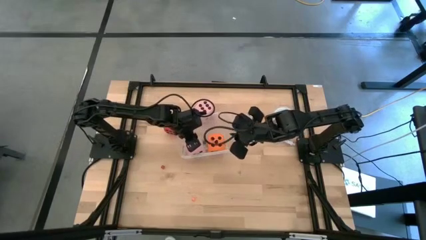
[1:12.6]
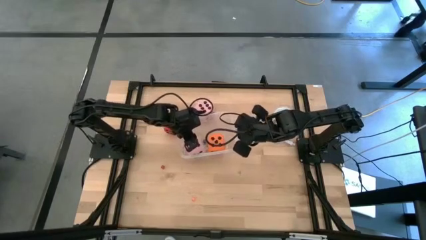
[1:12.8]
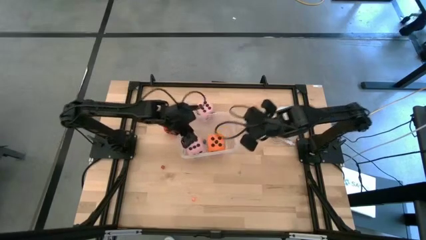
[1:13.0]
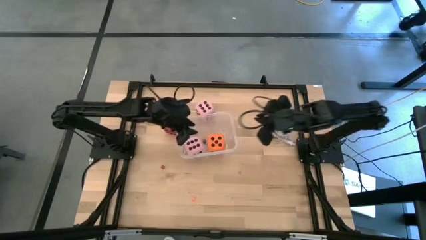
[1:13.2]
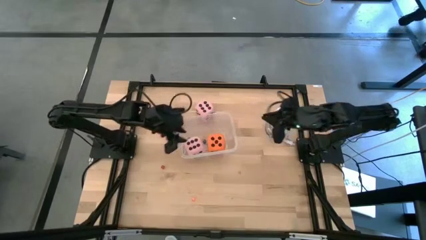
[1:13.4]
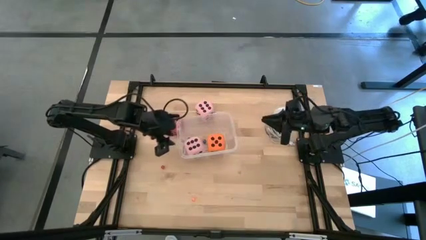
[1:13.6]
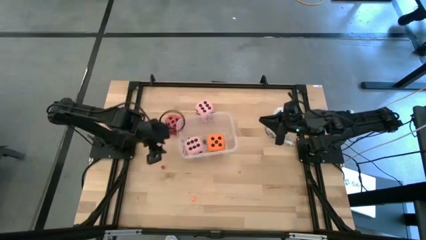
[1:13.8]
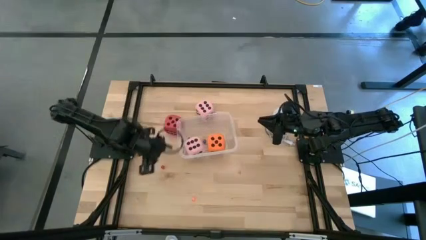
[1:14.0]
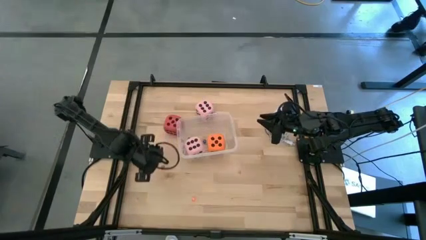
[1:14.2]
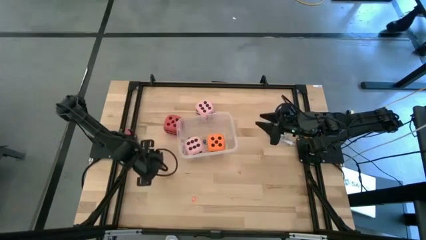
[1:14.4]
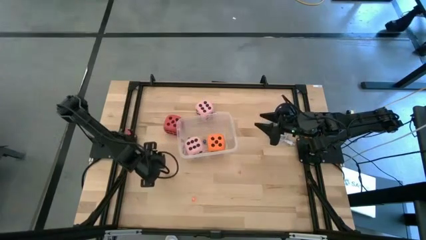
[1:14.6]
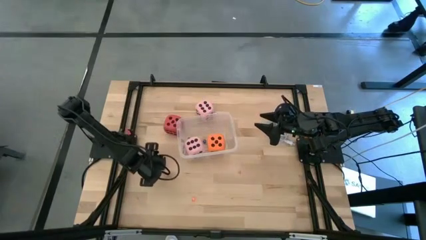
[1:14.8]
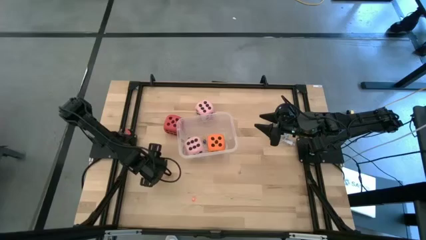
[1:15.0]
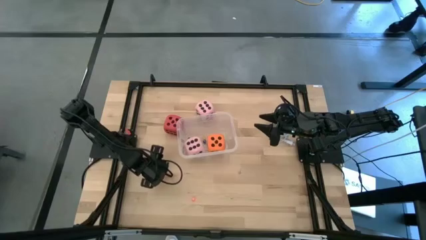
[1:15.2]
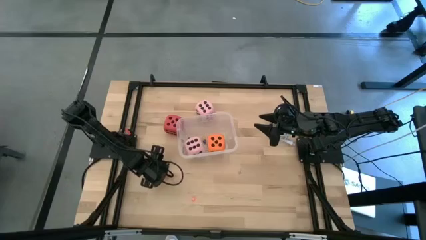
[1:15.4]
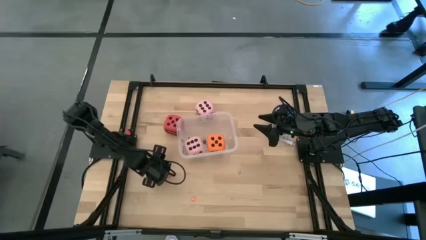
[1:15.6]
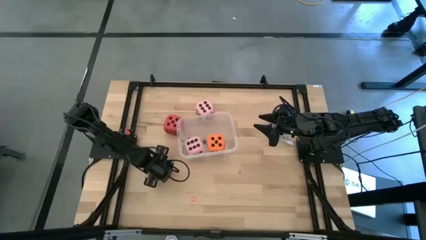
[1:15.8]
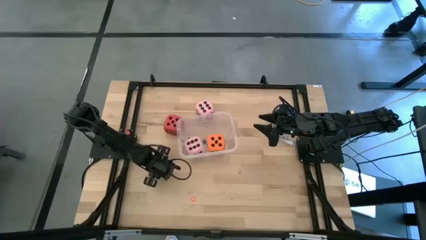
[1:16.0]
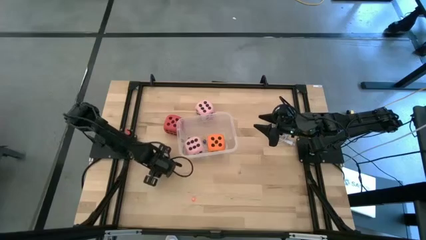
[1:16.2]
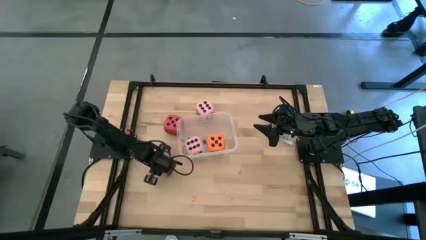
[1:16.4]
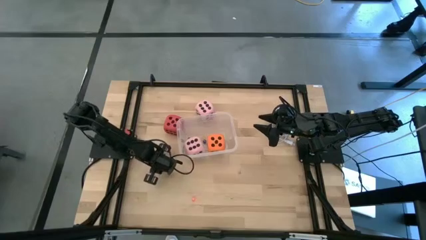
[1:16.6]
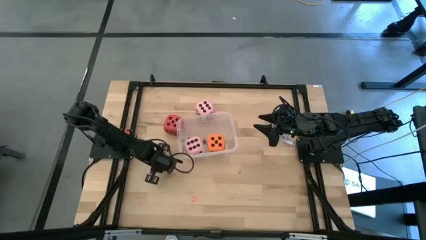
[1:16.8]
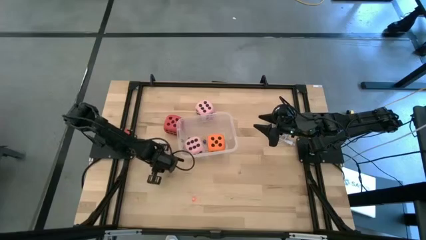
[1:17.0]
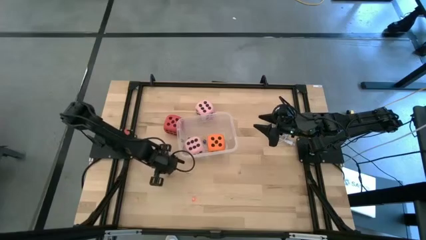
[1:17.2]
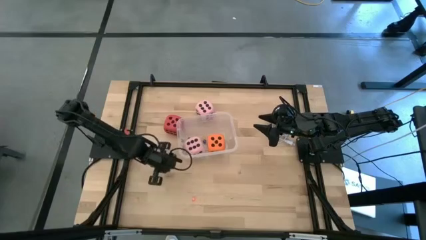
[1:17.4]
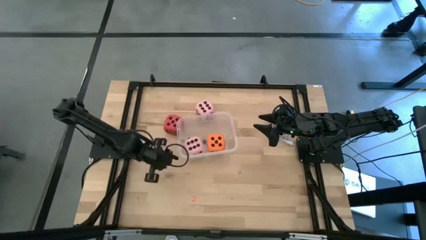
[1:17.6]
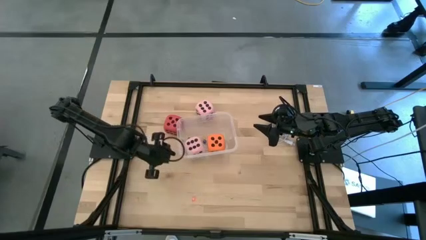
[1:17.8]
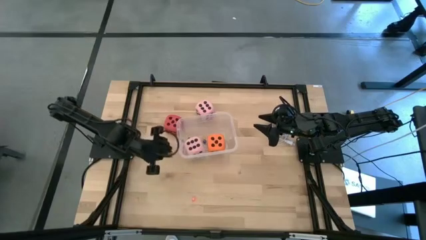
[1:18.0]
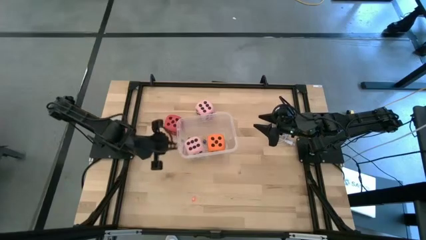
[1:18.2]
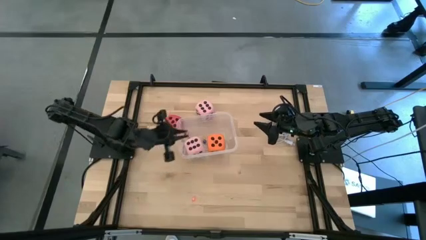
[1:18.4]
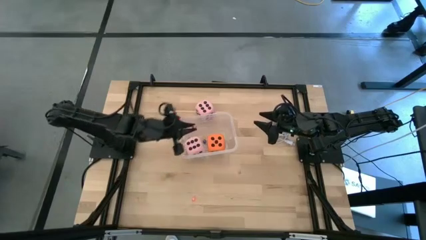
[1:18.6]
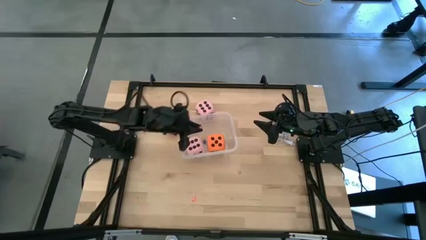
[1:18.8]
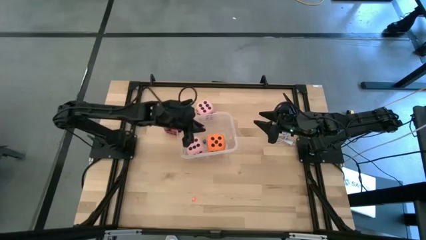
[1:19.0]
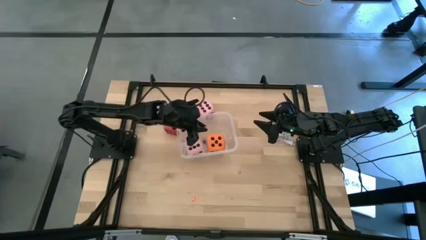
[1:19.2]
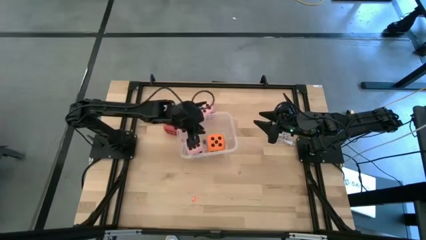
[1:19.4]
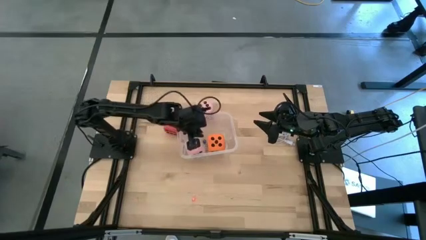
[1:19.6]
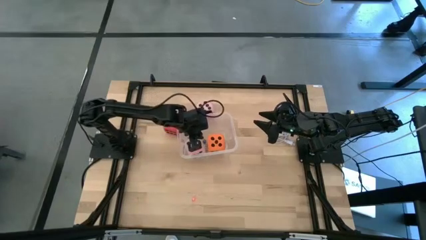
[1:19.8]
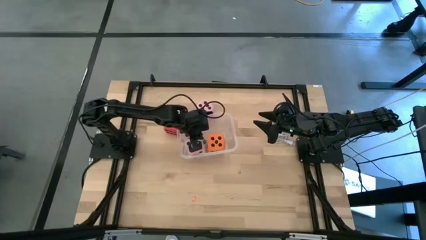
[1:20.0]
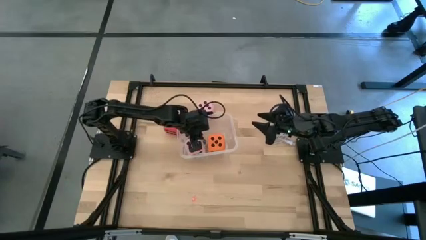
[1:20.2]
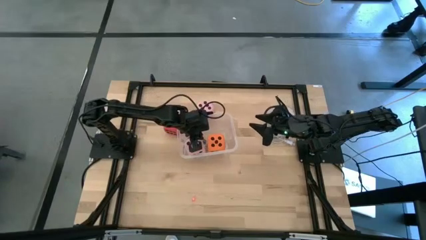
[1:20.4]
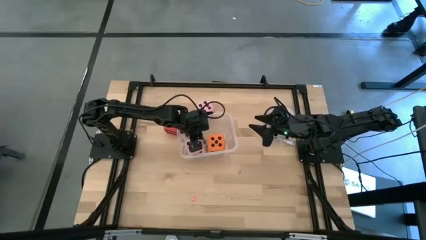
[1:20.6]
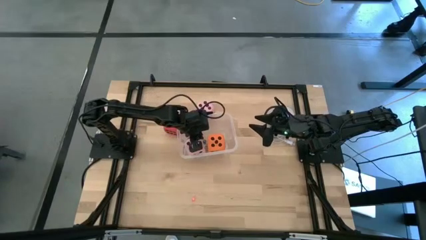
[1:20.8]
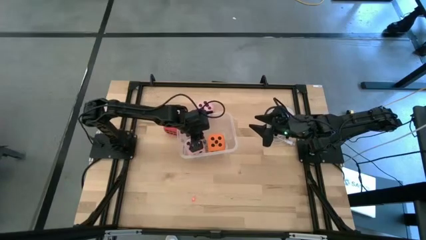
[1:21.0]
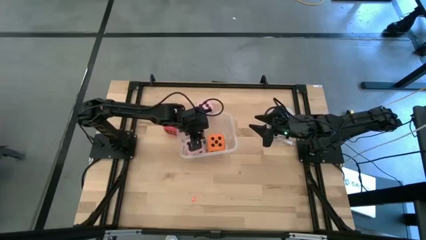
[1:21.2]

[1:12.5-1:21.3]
Task: Pick & Place Dice
Put the small red dice into the transparent bin

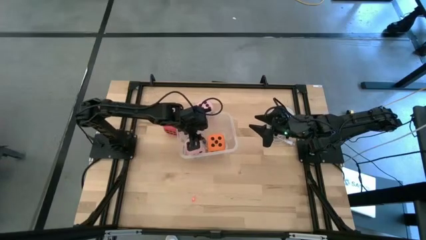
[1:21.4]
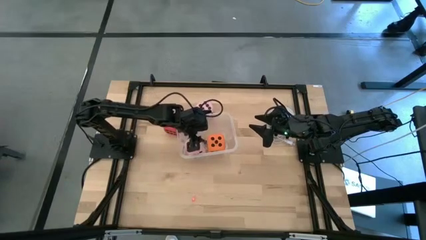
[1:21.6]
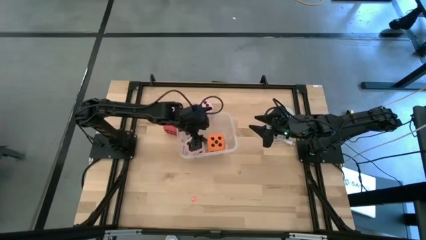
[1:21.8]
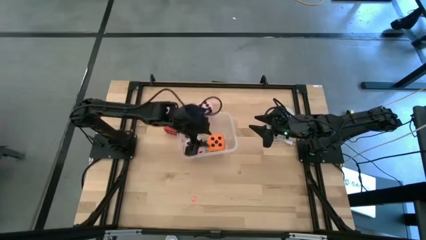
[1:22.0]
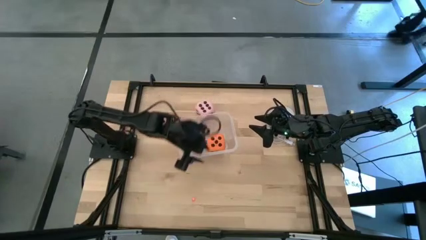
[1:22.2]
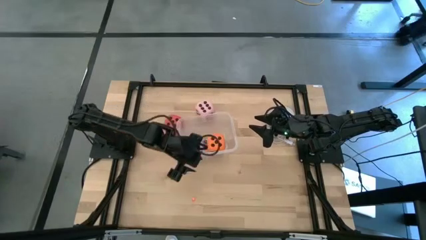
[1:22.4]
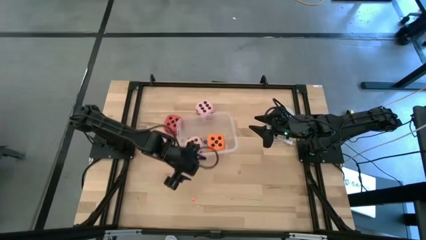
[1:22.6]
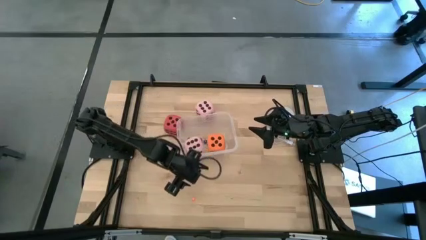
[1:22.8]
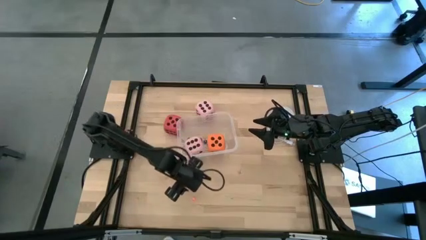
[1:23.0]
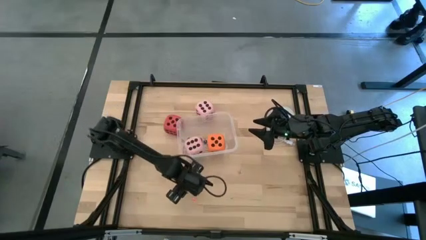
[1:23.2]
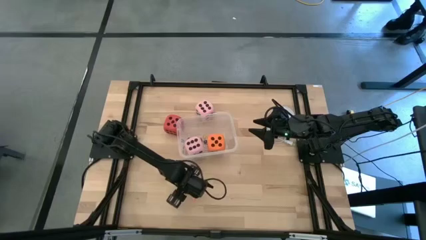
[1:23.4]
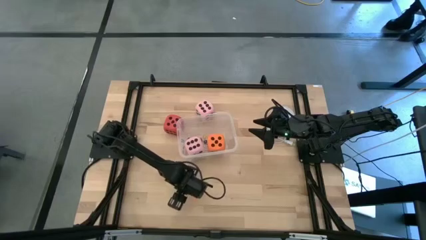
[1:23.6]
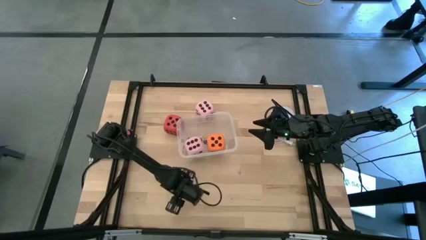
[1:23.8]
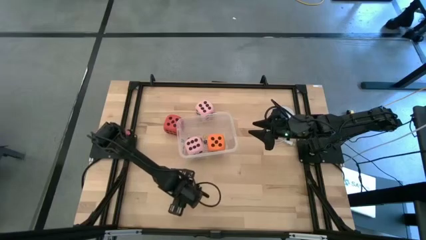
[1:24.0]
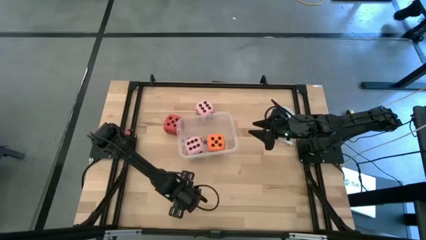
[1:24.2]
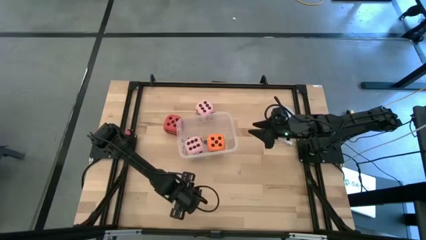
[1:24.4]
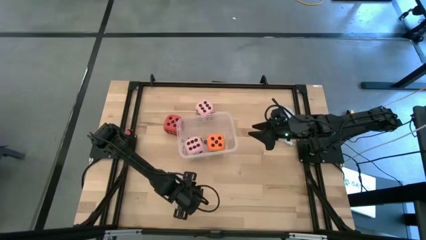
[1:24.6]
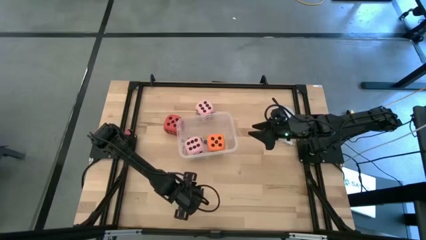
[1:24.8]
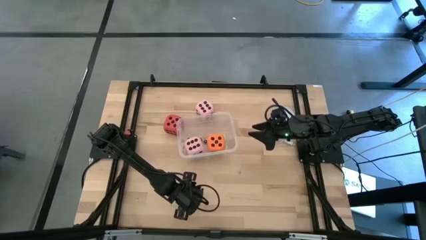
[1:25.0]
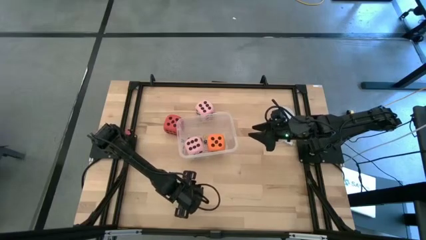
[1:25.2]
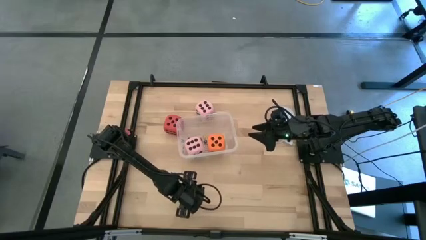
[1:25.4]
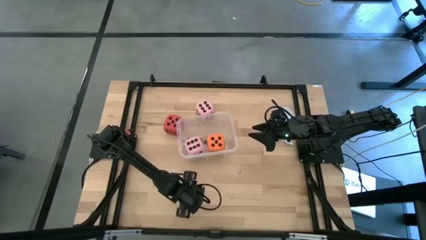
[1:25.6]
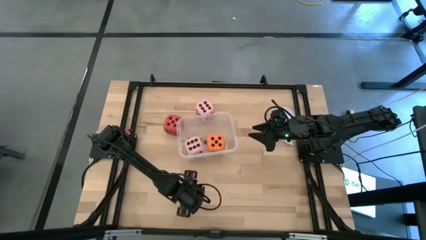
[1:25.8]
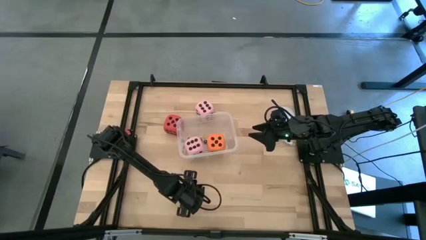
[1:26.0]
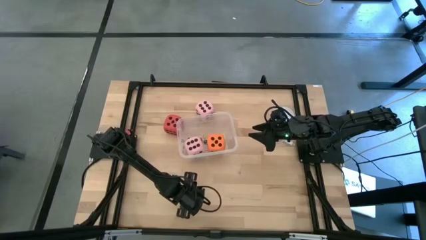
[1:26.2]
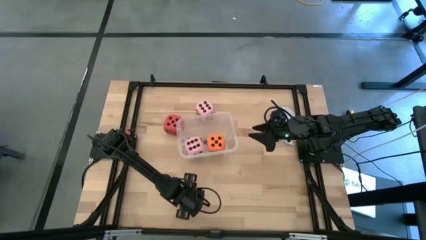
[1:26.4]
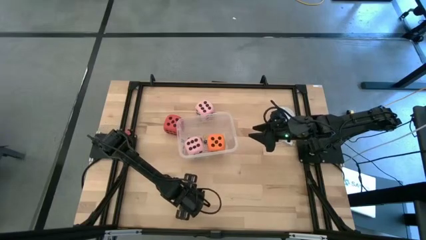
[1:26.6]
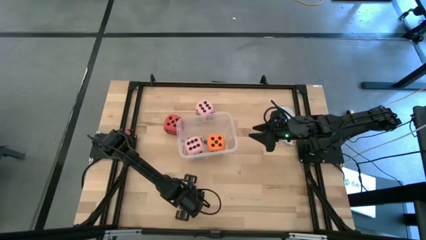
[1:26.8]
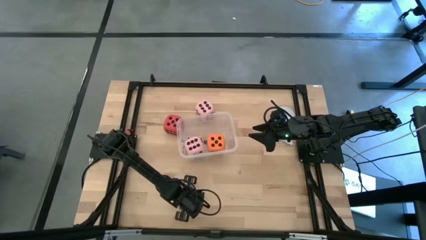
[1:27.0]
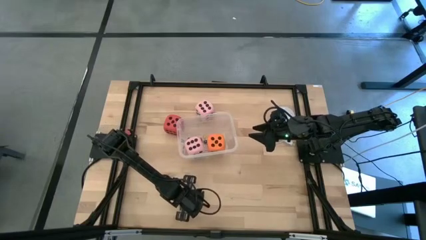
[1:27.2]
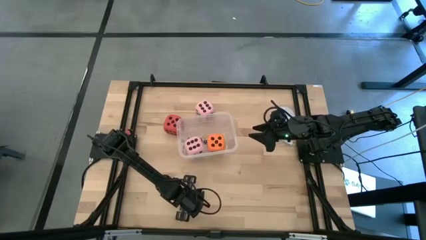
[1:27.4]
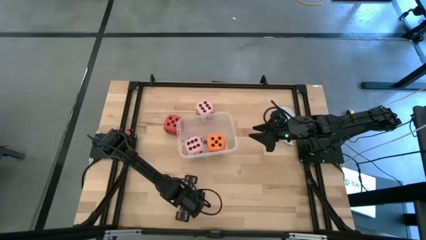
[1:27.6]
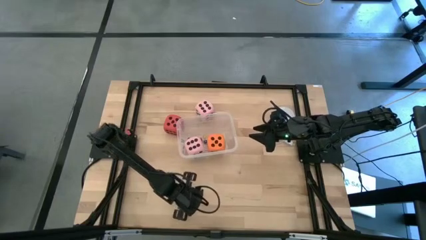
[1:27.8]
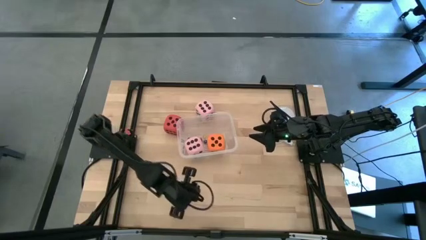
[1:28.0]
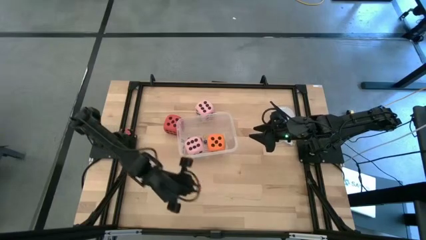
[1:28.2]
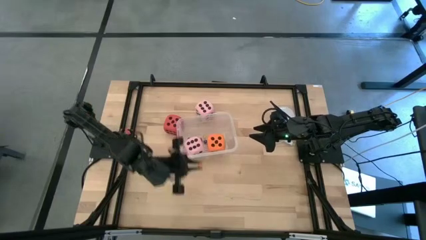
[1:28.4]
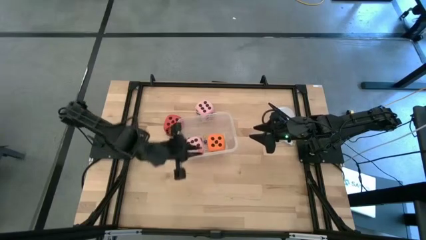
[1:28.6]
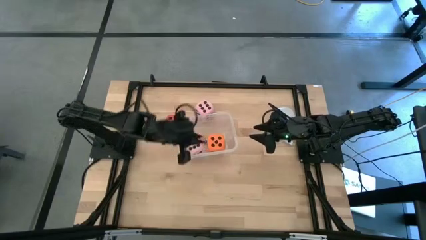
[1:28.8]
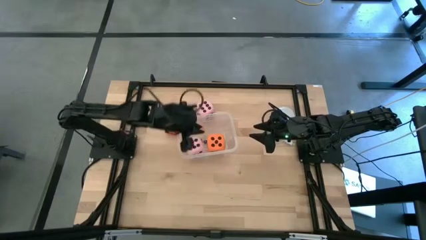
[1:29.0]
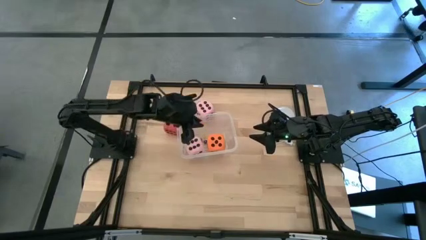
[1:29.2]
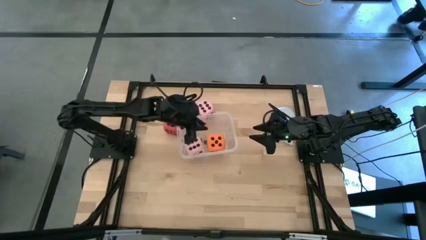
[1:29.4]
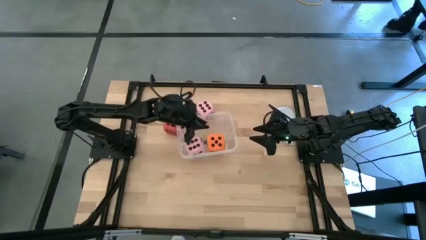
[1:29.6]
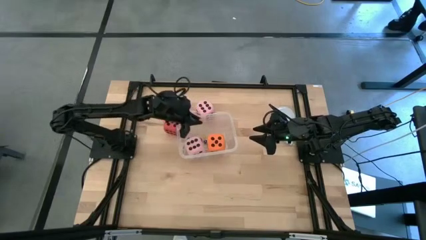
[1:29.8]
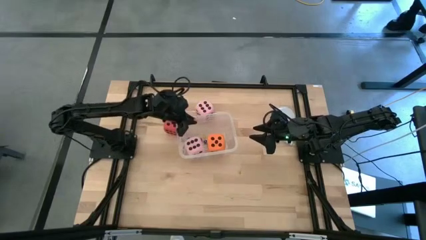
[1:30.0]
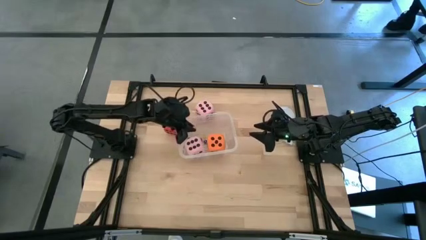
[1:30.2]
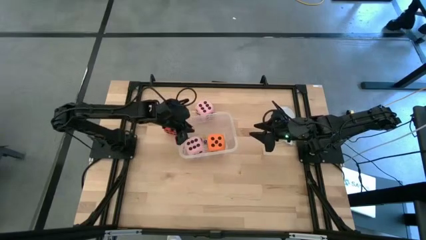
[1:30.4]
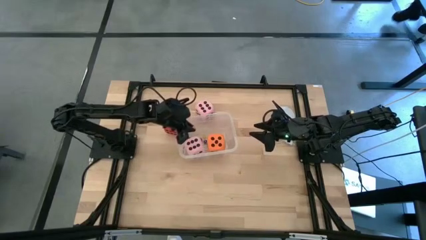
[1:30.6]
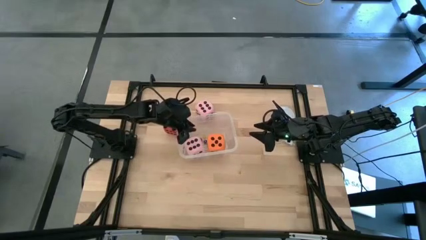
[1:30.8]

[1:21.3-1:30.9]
Put the small orange dice into the transparent bin
